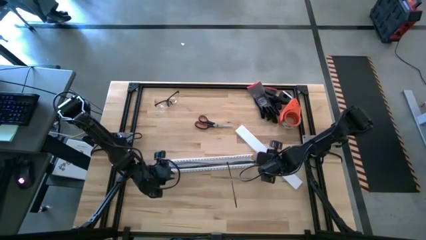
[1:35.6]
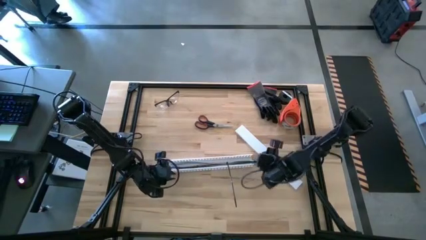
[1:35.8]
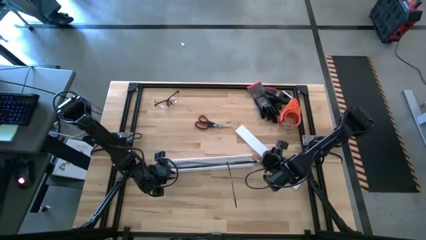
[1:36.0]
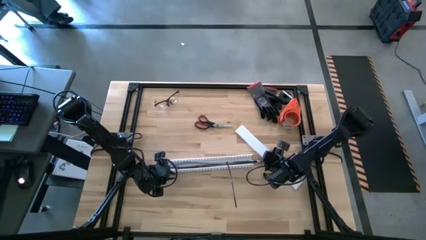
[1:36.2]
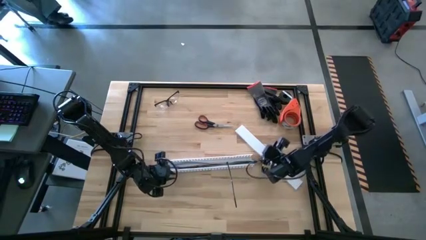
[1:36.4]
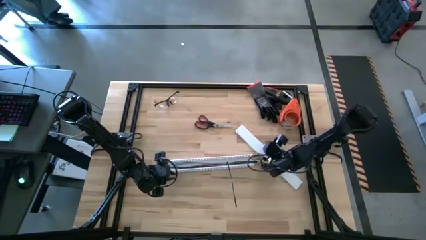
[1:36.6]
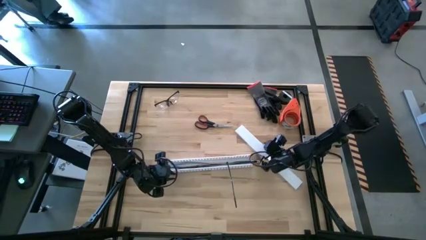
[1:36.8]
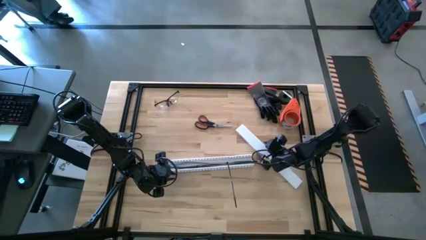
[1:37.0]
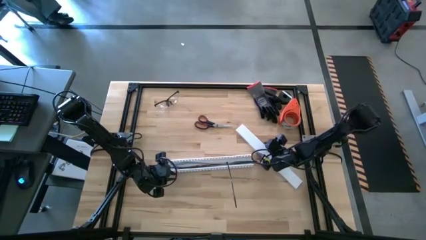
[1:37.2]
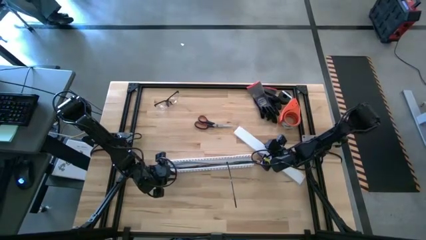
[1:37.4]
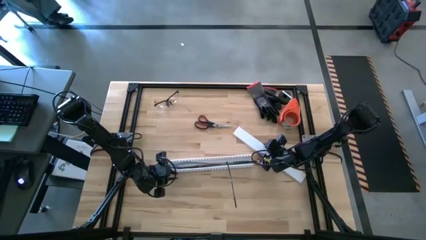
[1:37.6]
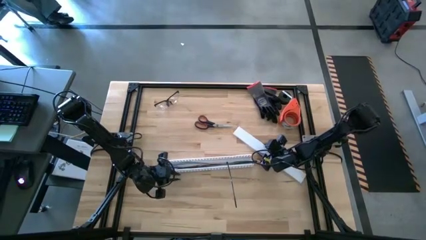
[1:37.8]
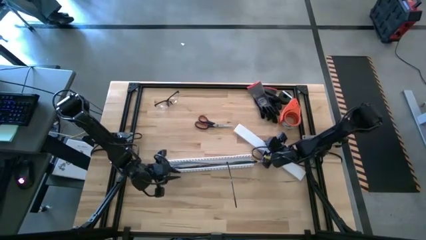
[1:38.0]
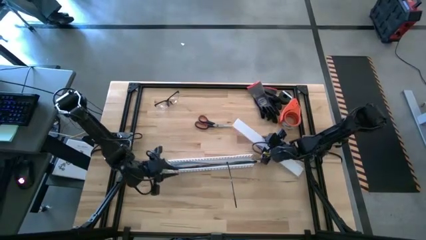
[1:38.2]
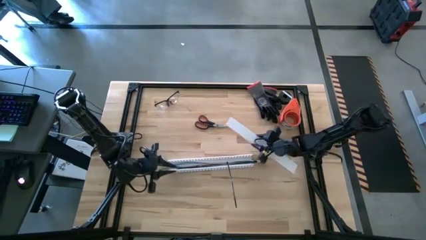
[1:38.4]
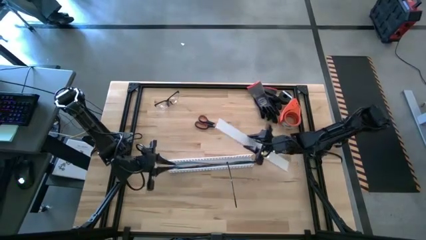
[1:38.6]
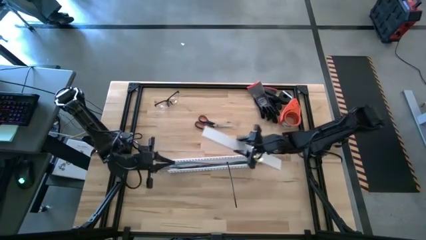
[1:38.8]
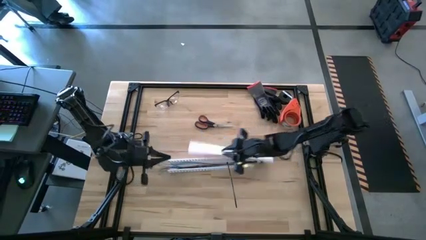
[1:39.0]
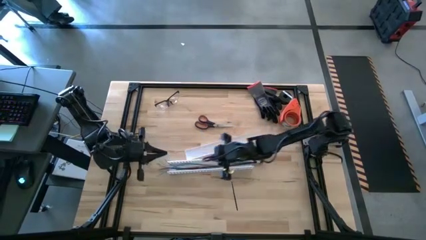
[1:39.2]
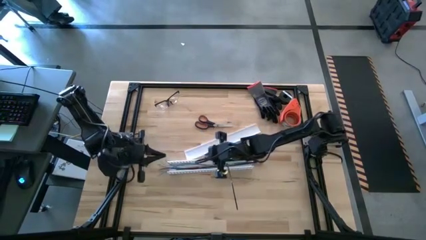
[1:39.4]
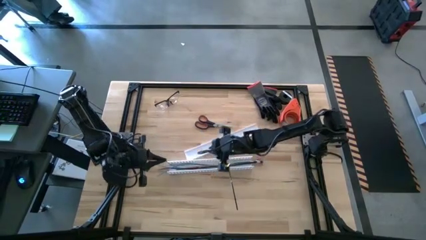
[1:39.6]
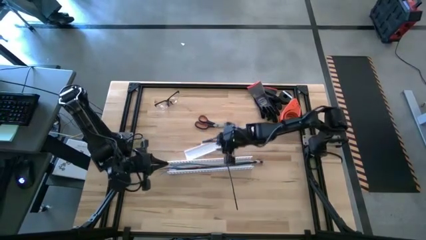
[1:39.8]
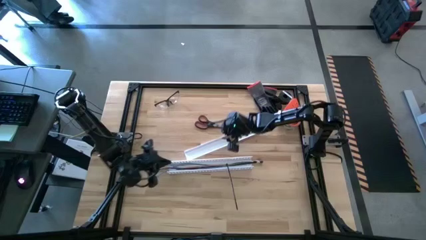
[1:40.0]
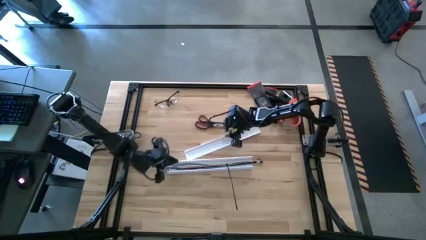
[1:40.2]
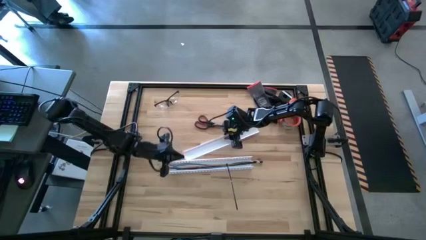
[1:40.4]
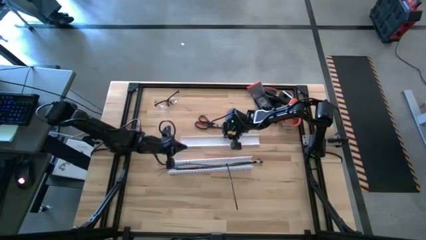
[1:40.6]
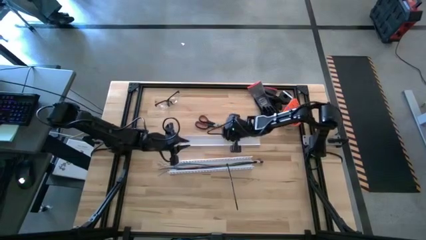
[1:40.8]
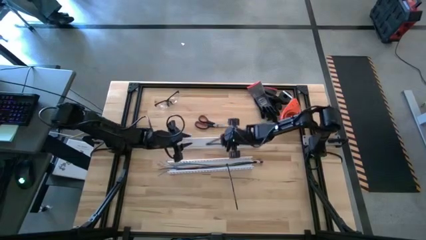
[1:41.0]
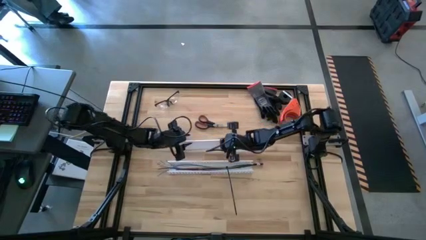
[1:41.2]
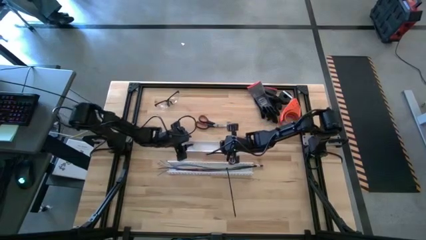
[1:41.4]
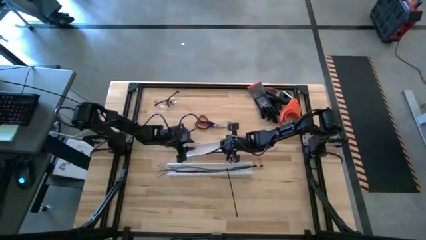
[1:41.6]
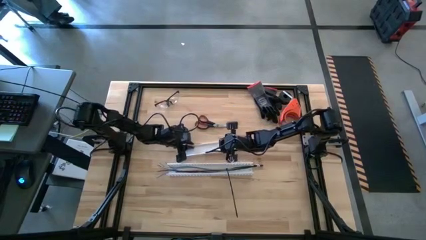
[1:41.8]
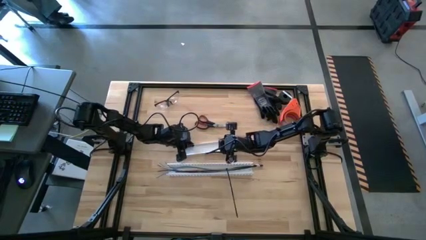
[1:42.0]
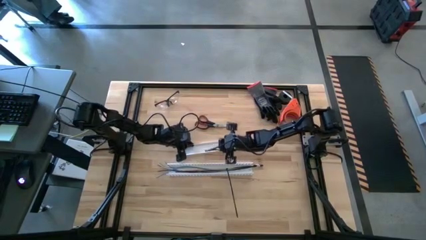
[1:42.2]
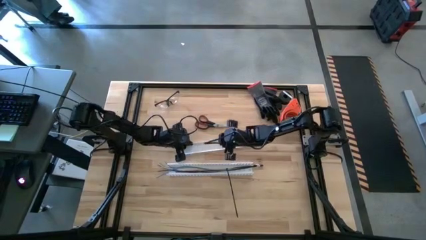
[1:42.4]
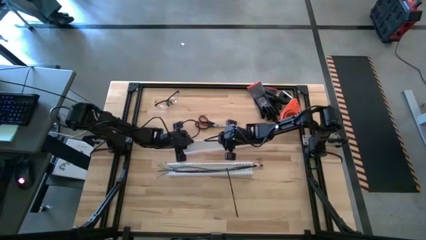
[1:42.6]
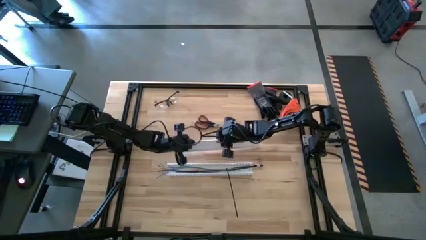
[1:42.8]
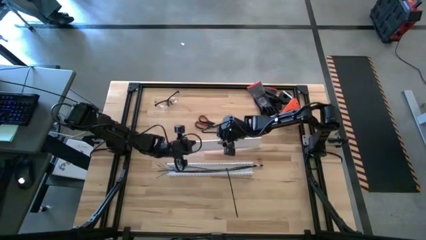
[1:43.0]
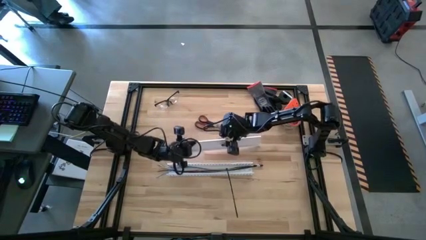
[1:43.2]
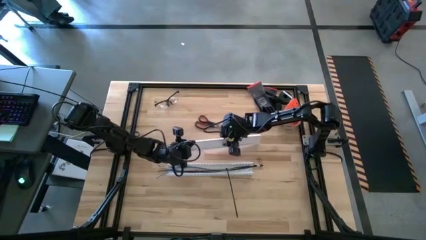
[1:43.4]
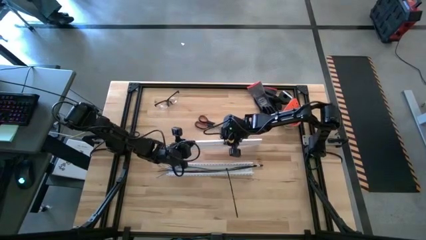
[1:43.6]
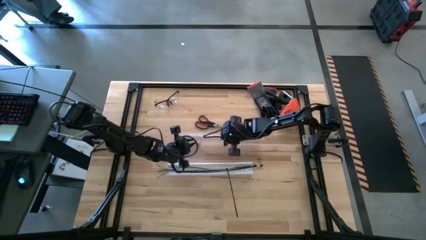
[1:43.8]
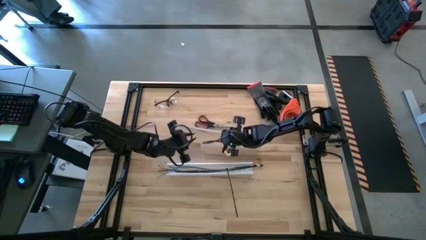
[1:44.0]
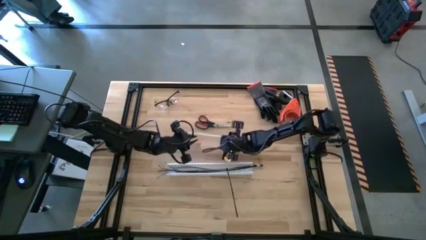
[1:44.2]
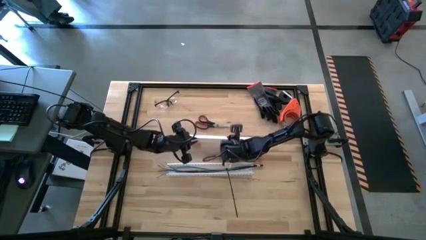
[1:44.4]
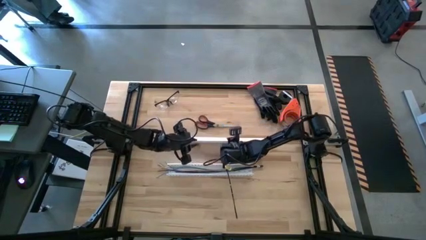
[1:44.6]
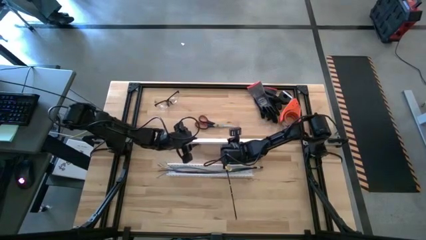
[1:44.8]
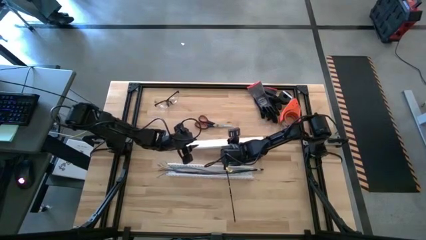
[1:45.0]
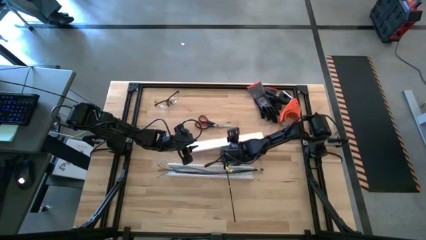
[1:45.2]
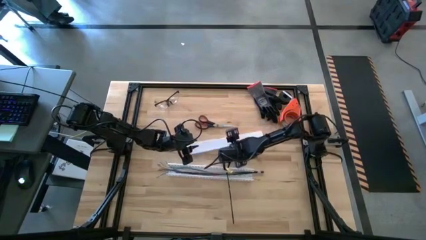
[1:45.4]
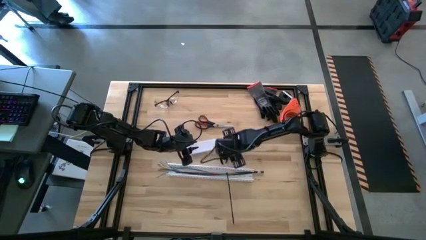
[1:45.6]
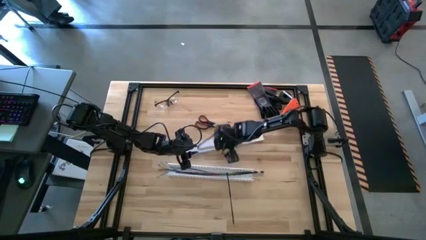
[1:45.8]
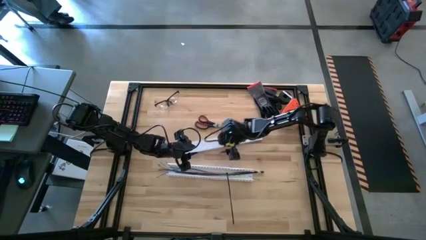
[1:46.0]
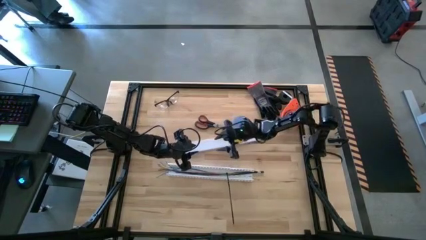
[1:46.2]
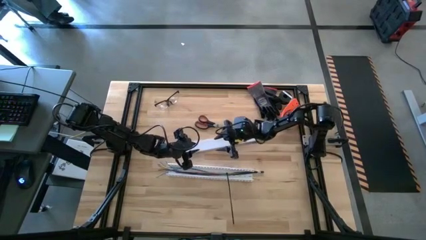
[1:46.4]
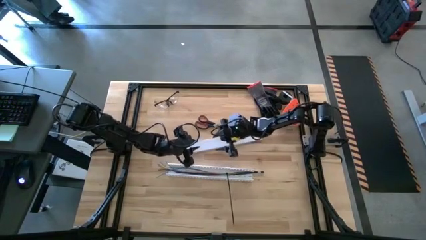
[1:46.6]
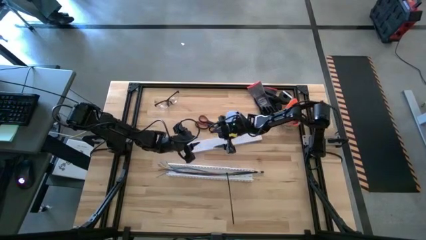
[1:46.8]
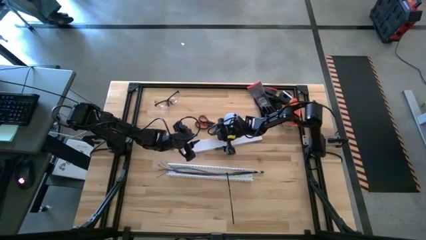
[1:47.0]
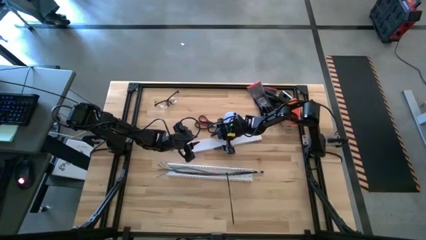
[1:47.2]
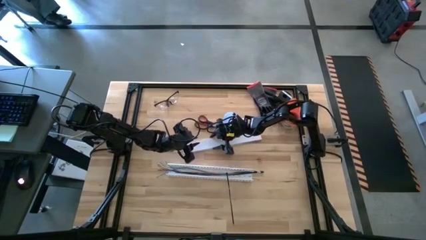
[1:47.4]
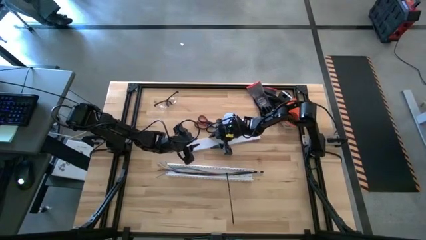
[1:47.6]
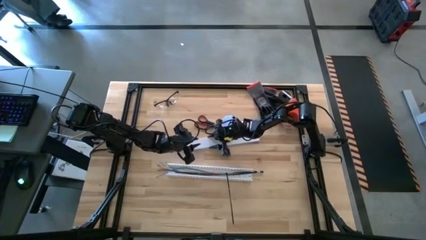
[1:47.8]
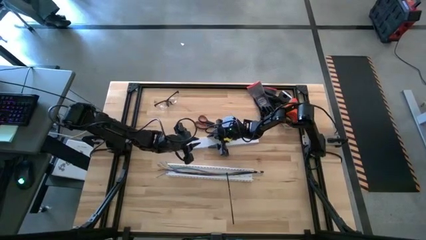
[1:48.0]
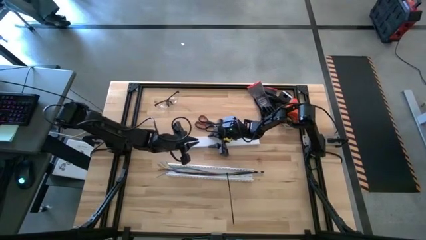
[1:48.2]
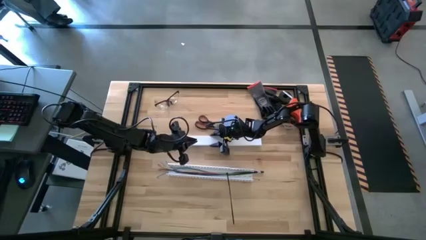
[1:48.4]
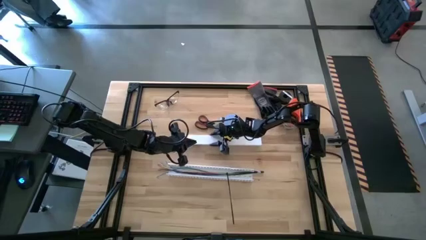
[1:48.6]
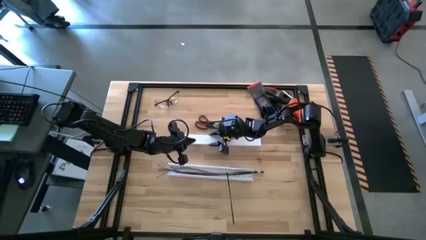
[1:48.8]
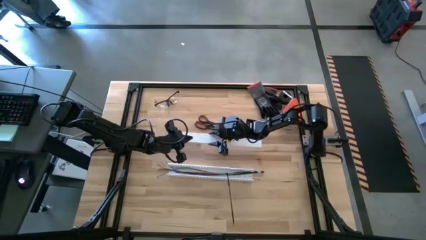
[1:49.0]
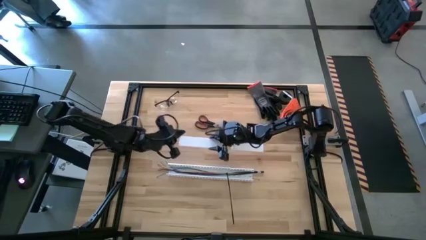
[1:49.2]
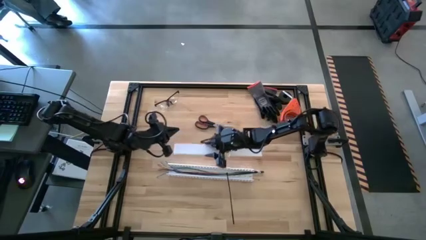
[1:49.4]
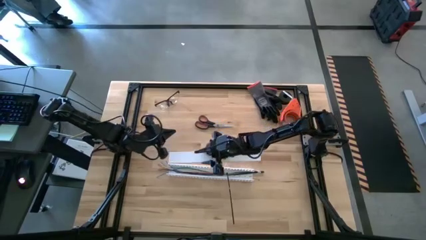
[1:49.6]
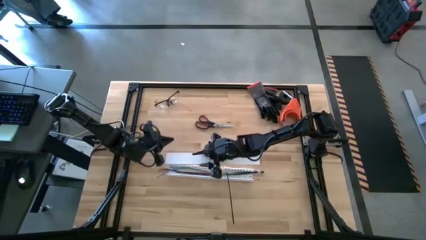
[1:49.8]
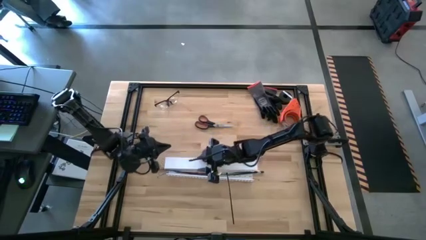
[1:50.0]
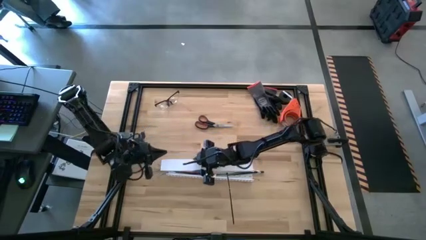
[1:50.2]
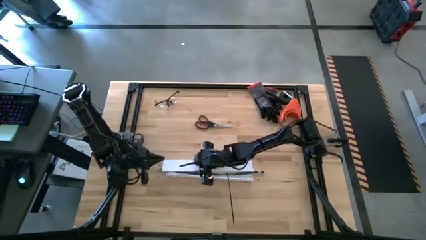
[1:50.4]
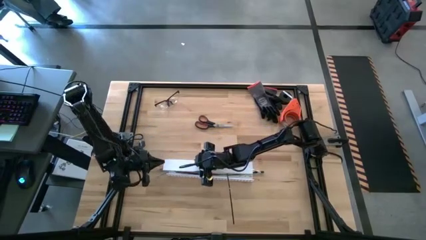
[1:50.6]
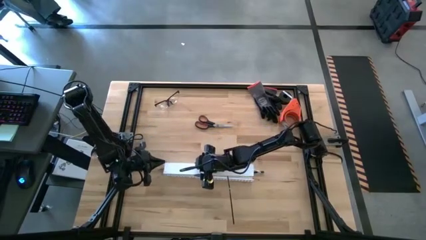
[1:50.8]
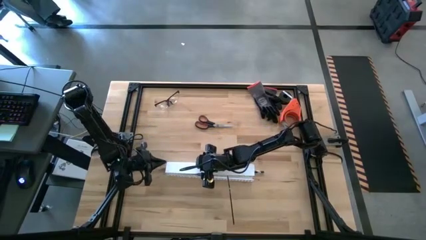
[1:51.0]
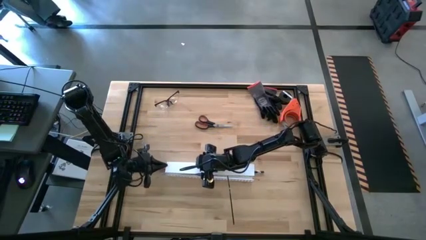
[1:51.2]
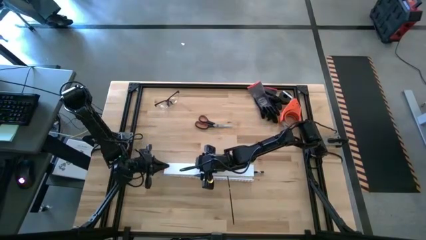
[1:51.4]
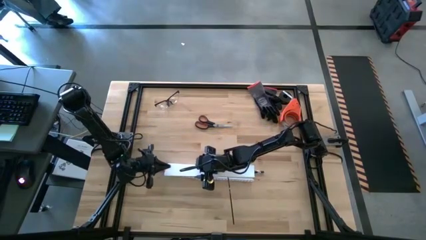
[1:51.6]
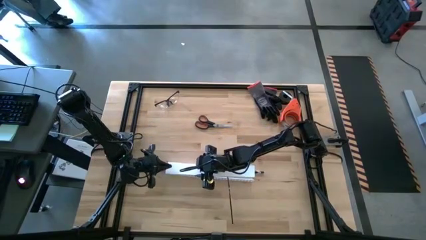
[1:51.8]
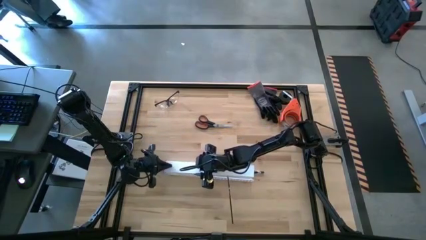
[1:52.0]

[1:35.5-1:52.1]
Task: Ziptie cables
Close the white cable duct lid
